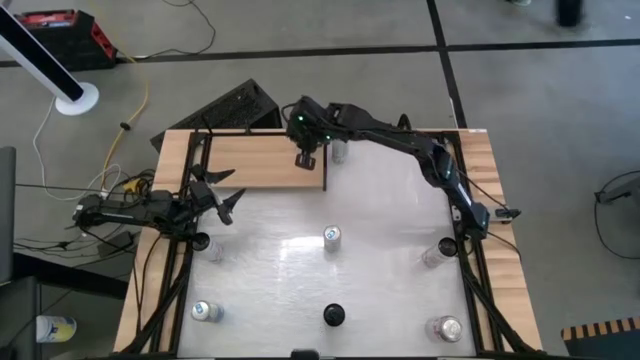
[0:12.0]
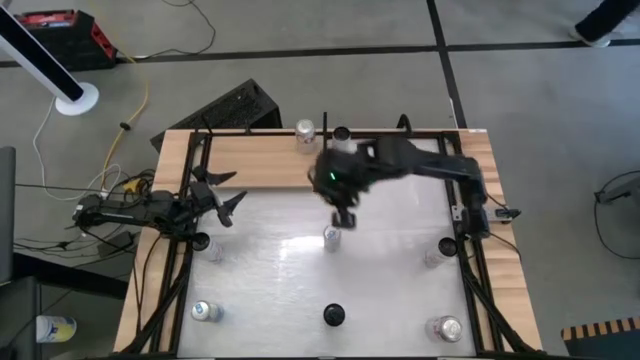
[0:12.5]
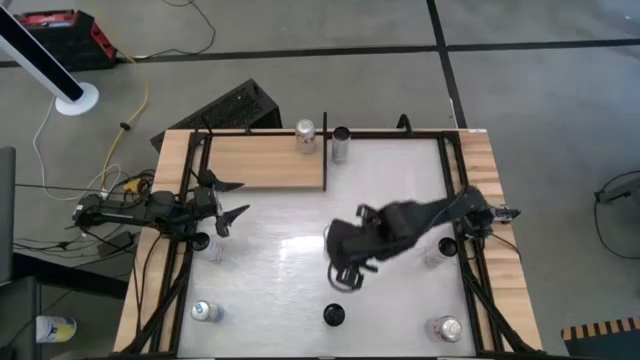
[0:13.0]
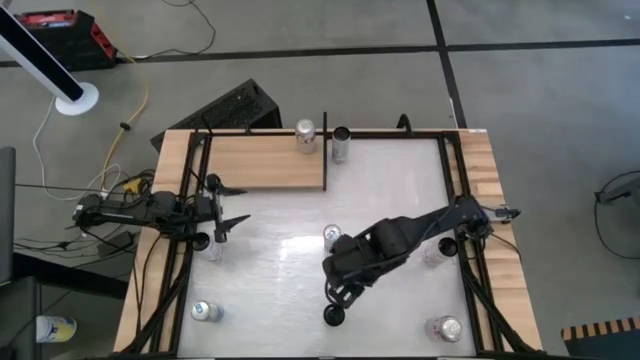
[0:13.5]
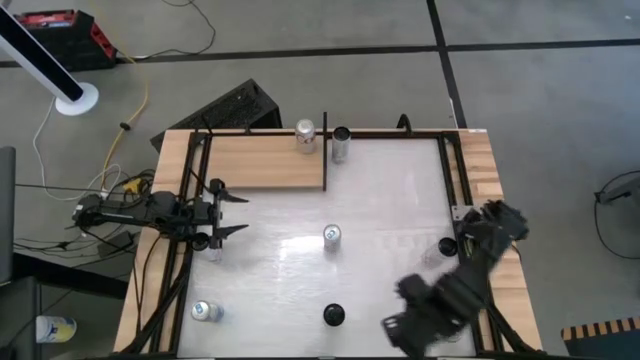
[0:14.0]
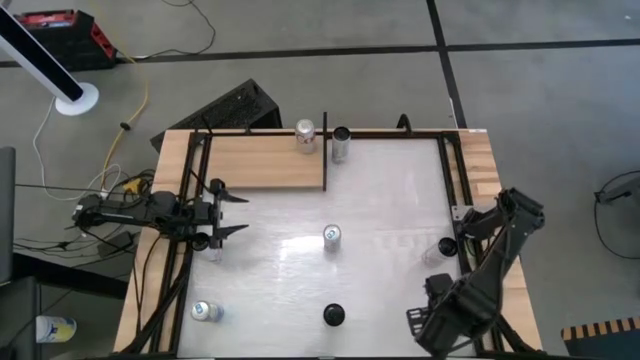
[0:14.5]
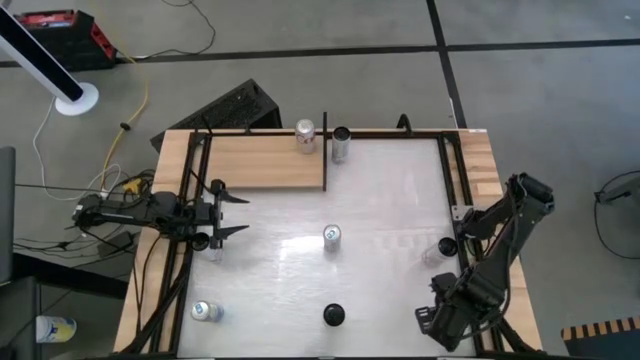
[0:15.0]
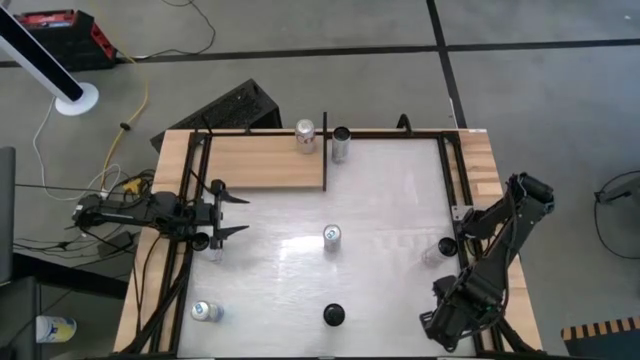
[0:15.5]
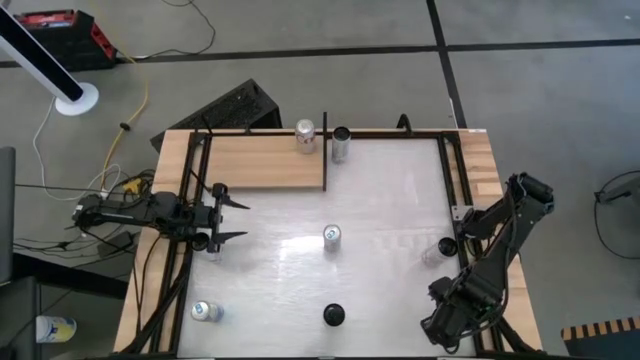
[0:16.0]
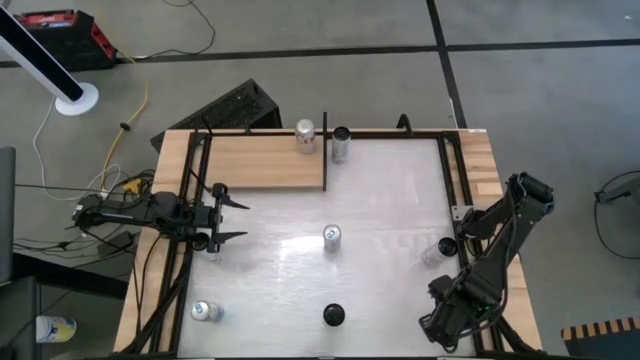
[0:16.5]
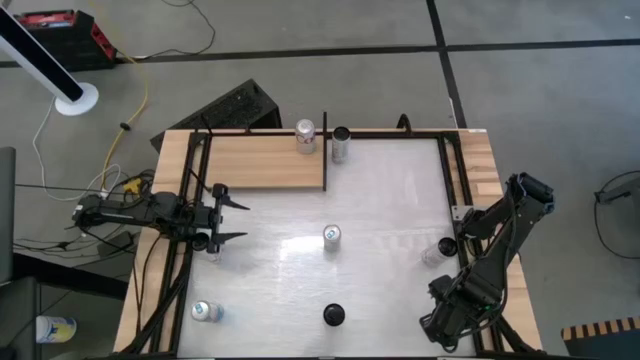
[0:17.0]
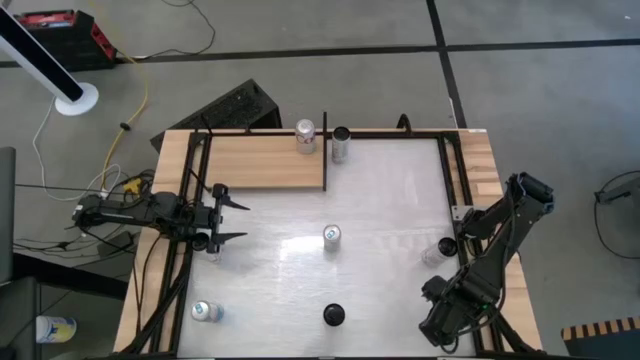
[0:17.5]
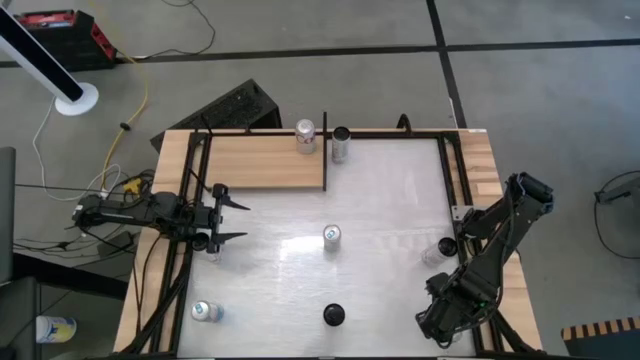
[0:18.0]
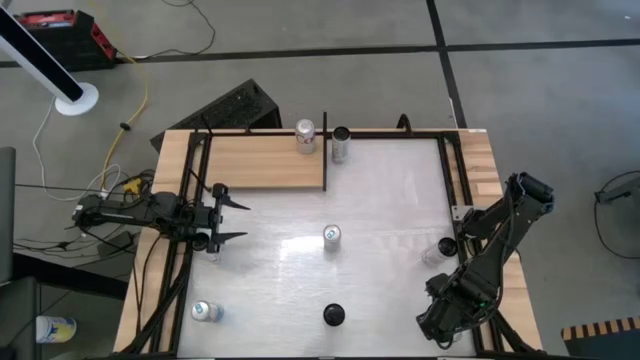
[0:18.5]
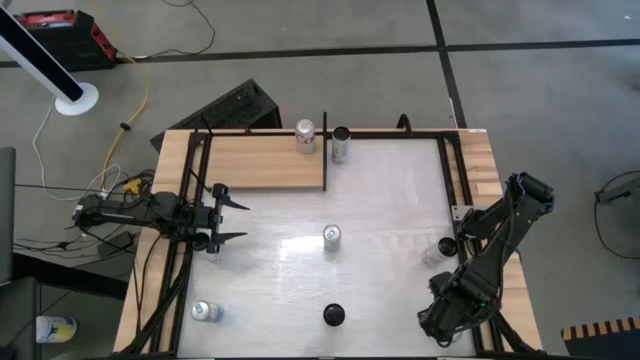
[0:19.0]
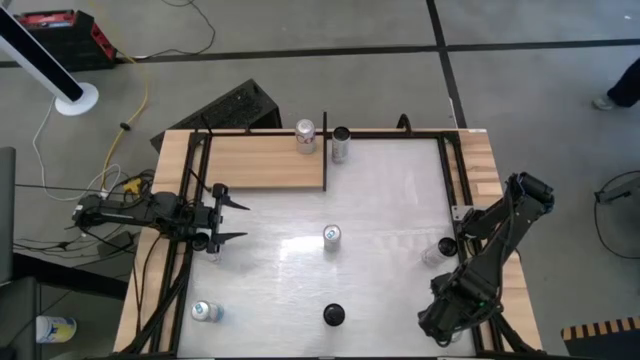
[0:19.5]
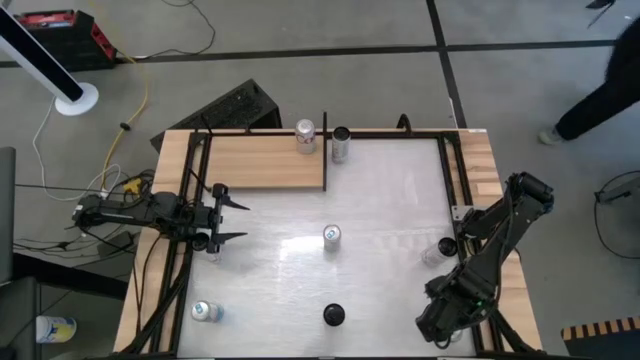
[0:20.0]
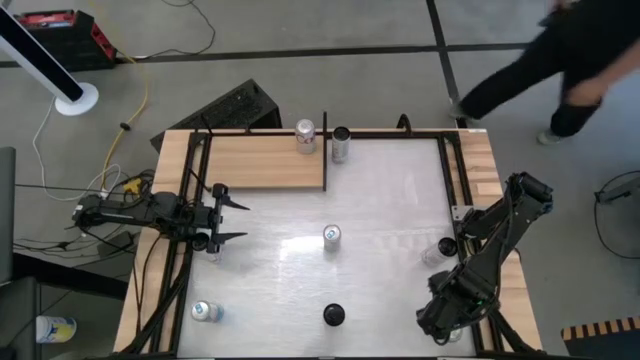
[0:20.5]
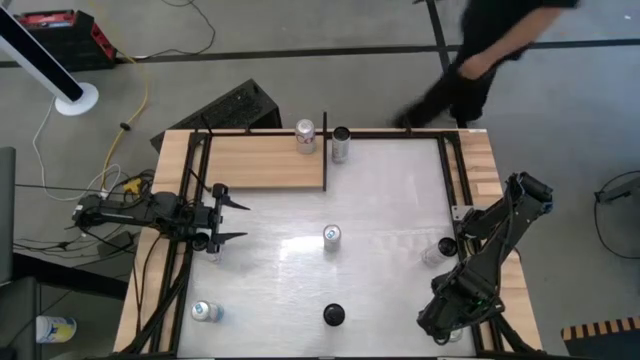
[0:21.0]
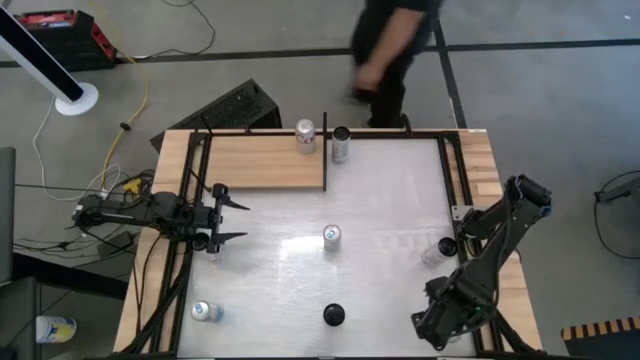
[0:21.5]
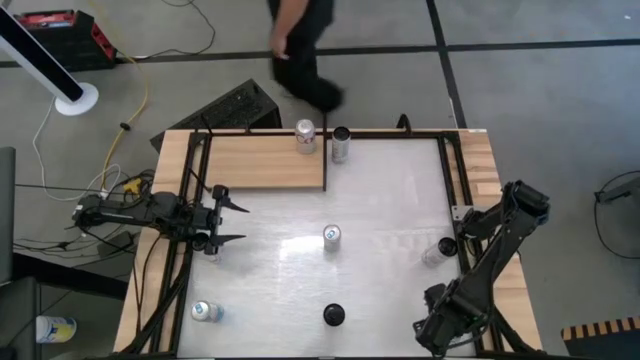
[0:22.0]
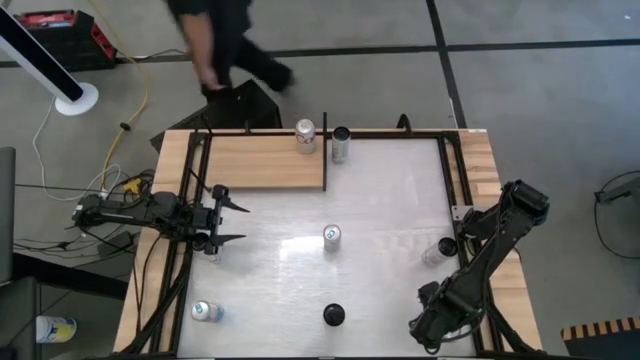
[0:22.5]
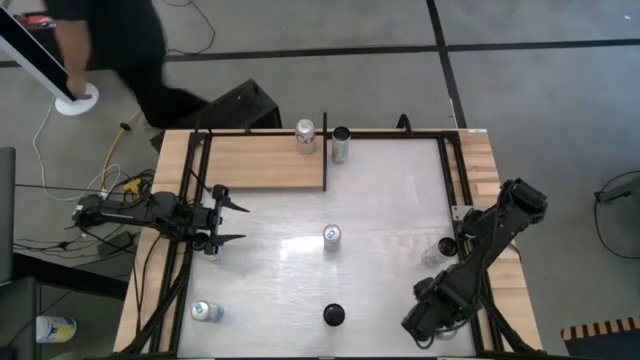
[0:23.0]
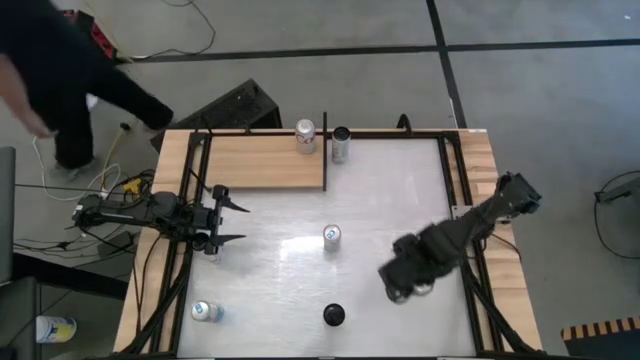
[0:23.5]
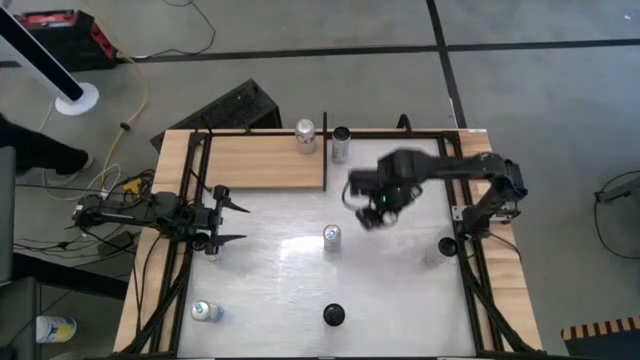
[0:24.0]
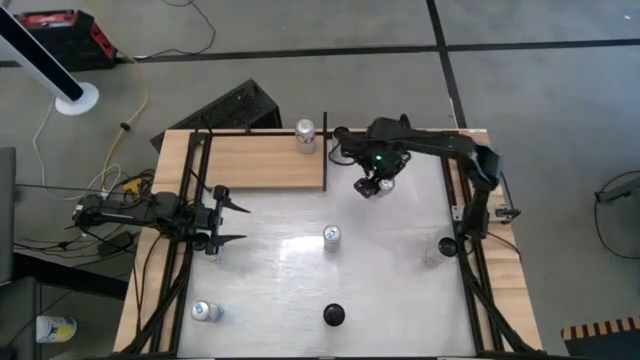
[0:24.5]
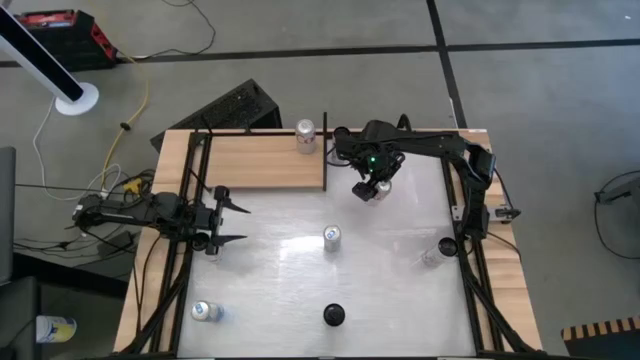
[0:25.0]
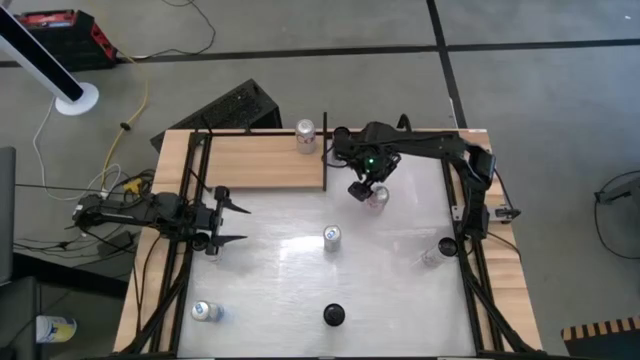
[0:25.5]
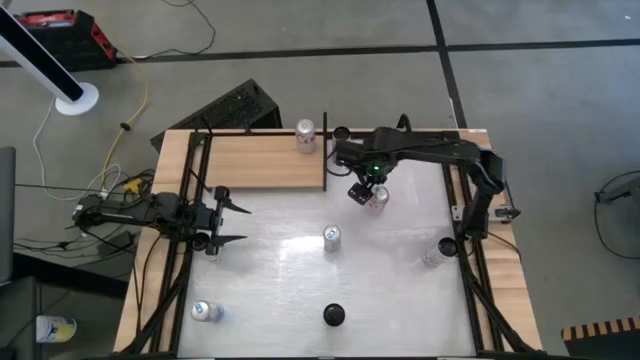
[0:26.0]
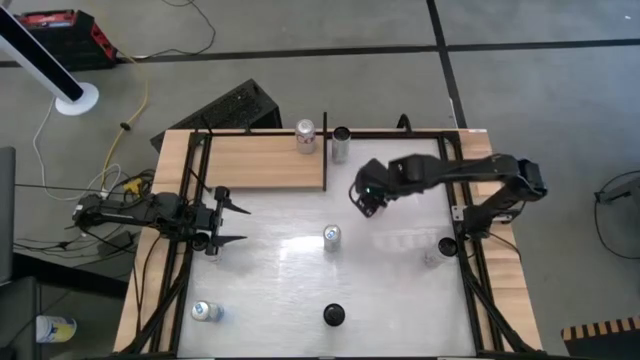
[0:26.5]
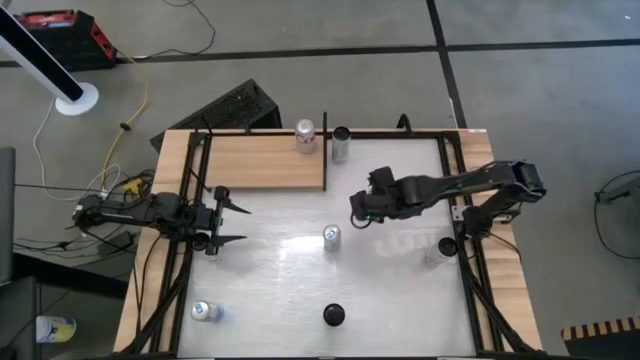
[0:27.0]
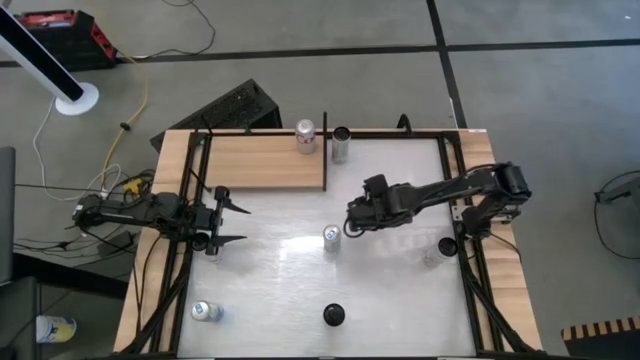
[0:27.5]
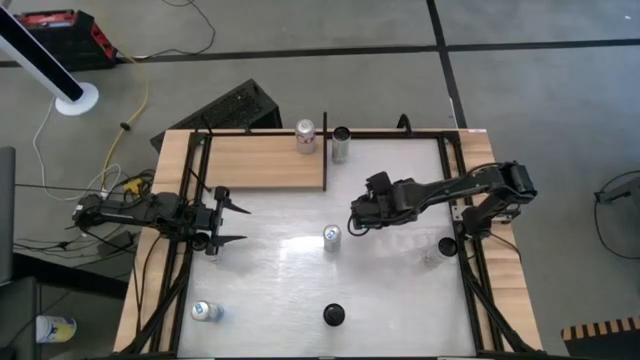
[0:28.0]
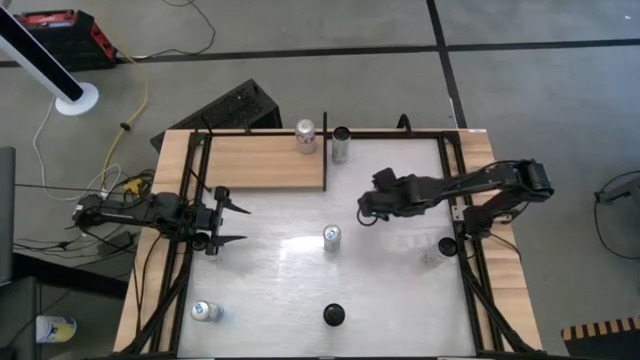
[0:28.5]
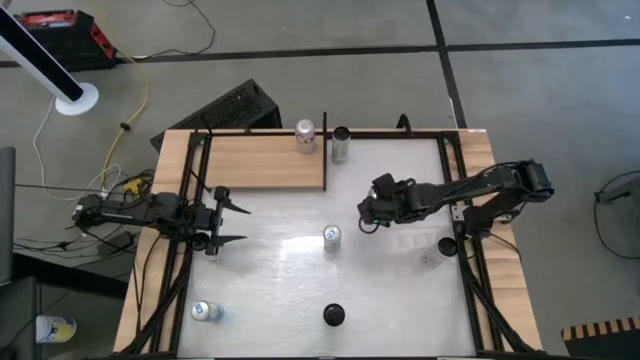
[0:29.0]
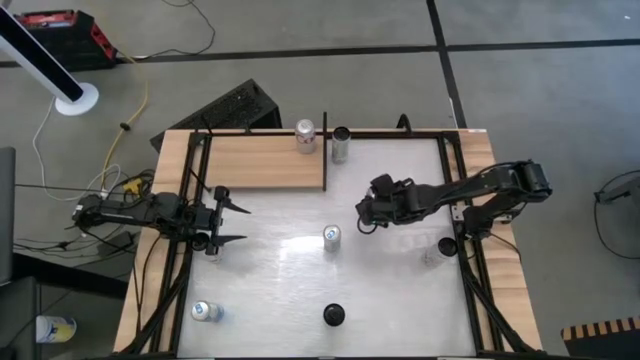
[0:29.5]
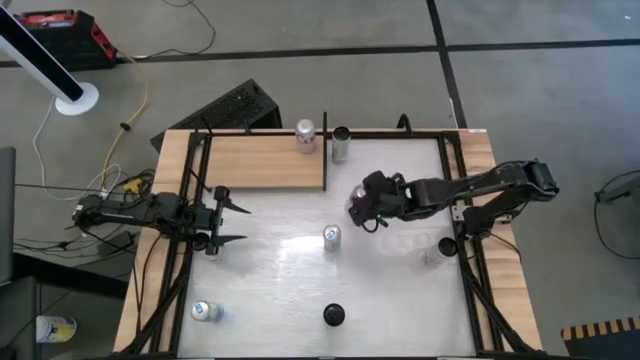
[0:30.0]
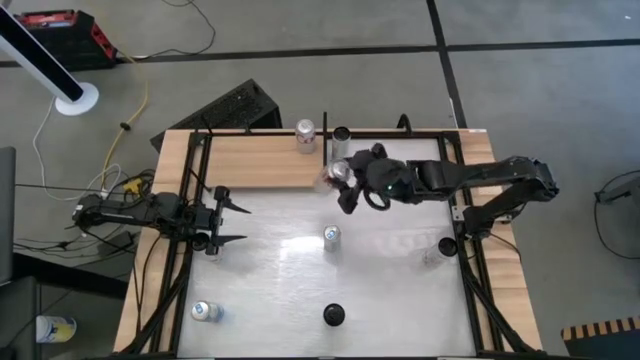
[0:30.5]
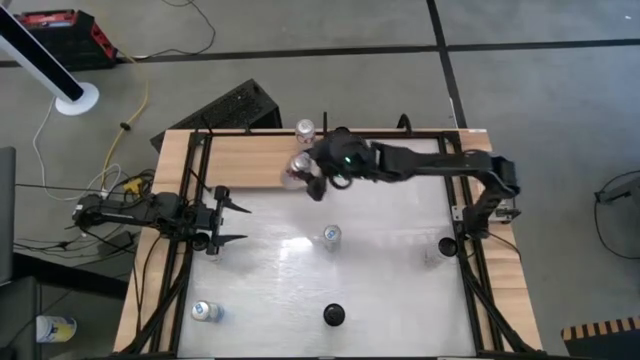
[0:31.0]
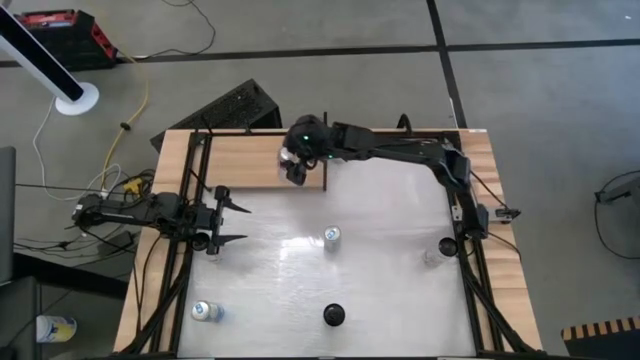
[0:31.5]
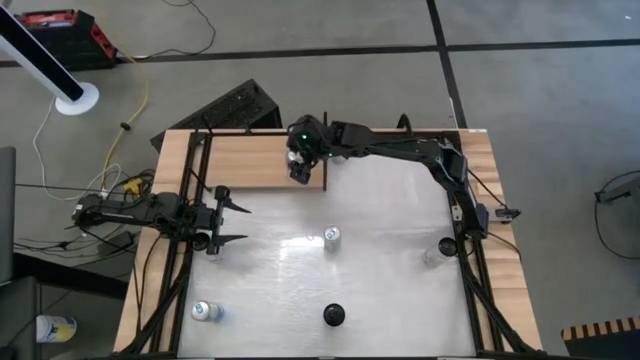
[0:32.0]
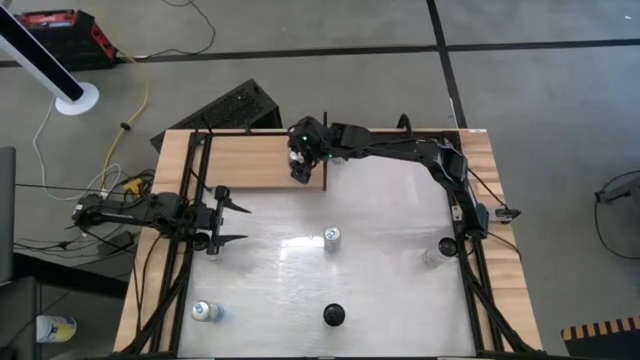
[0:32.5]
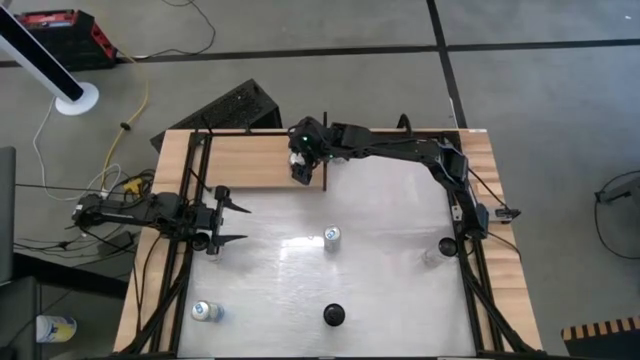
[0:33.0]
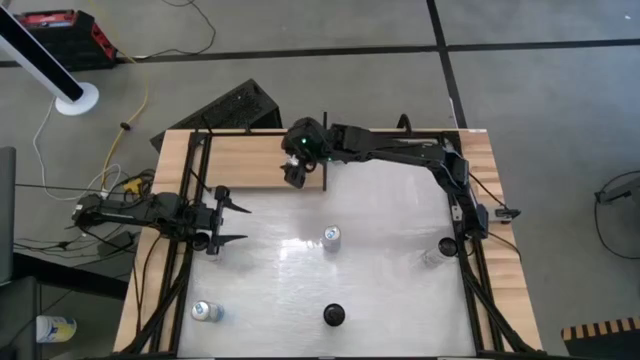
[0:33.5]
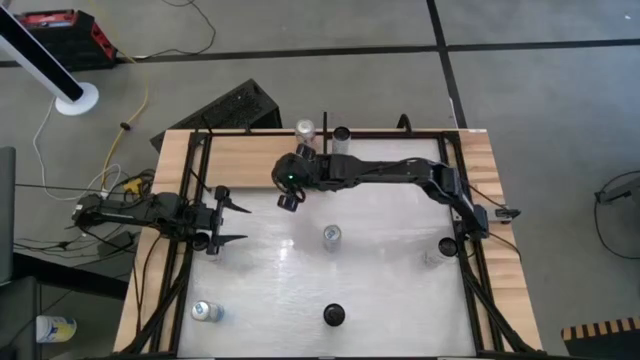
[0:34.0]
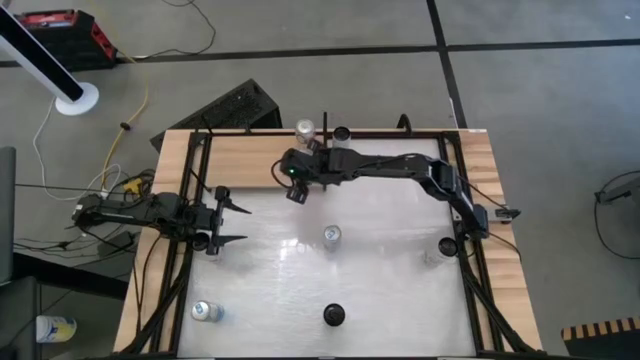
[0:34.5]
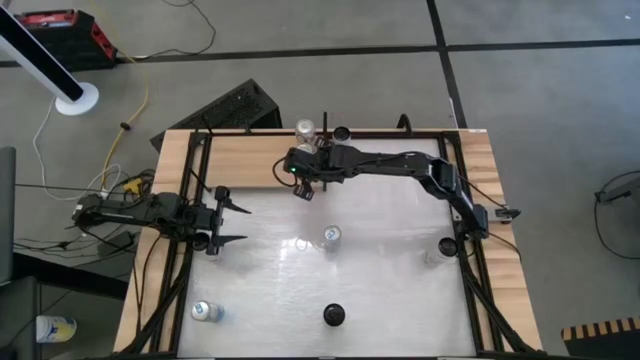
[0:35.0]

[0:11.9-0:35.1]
Task: Place canned beverage on shelf
Put the silver-red soda can on the shelf aligned with the other silver-red soda can
